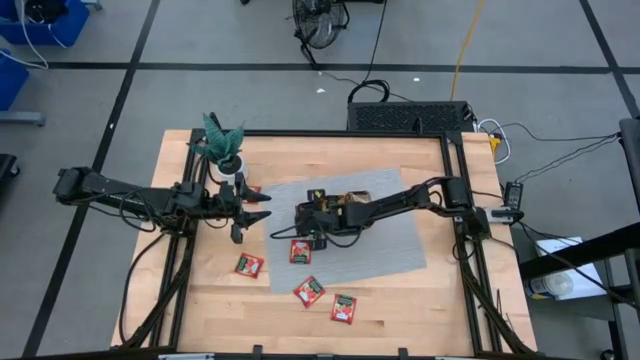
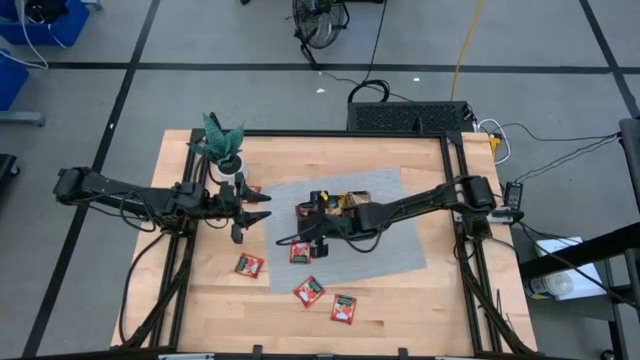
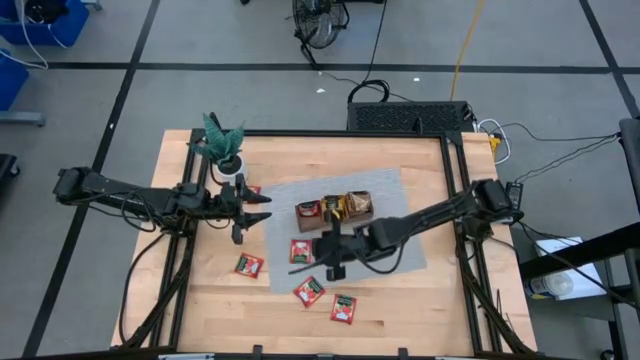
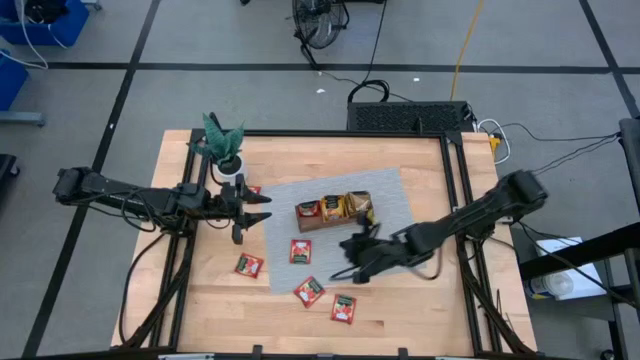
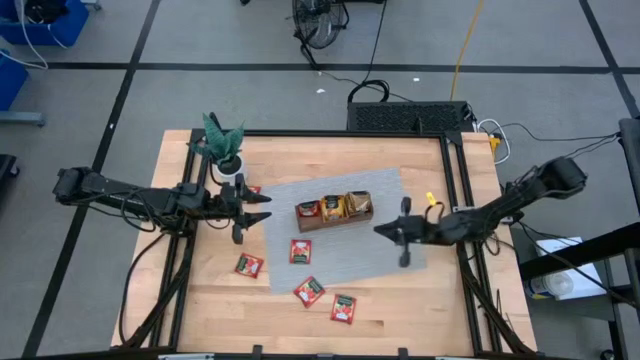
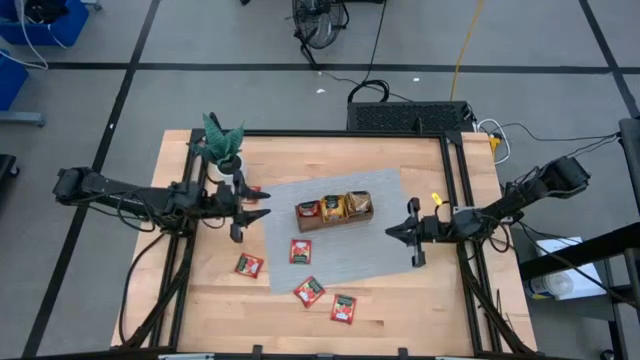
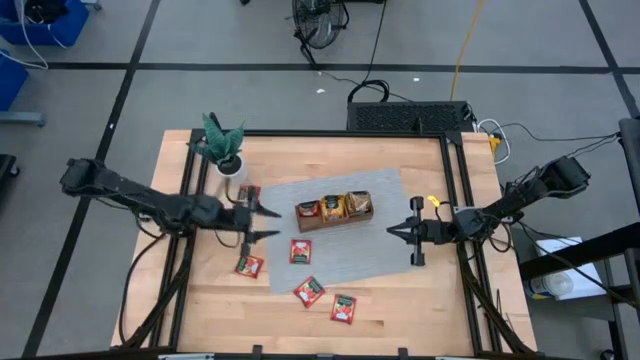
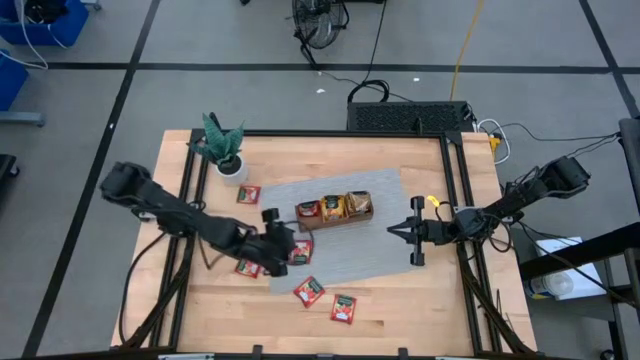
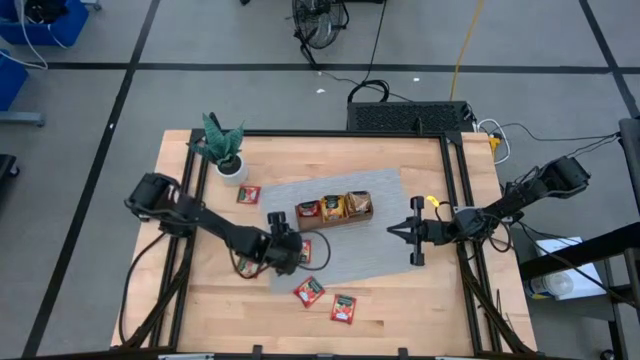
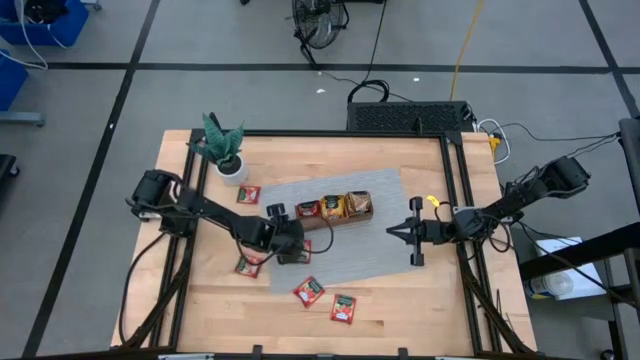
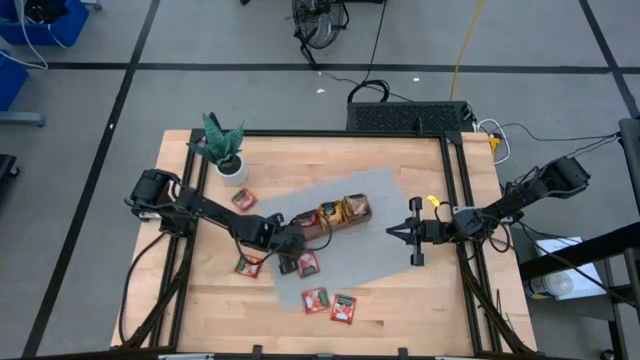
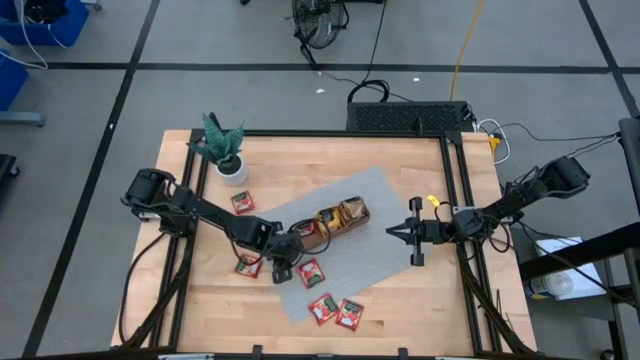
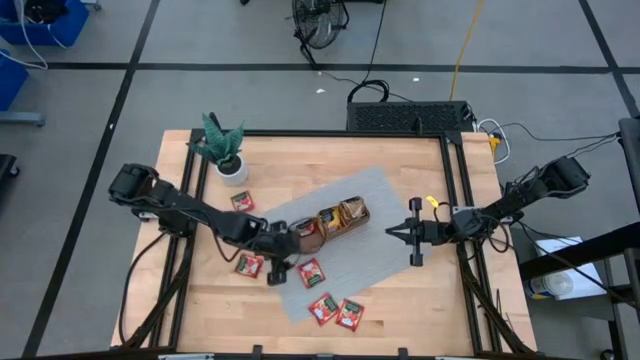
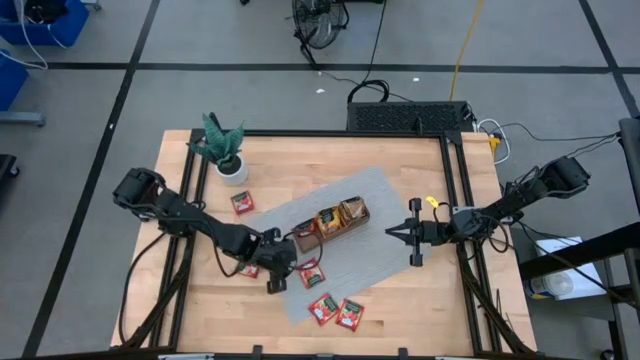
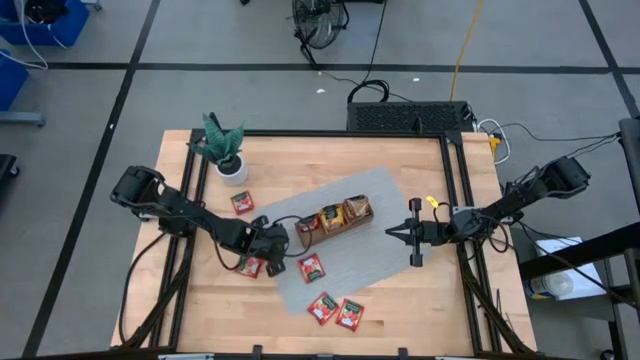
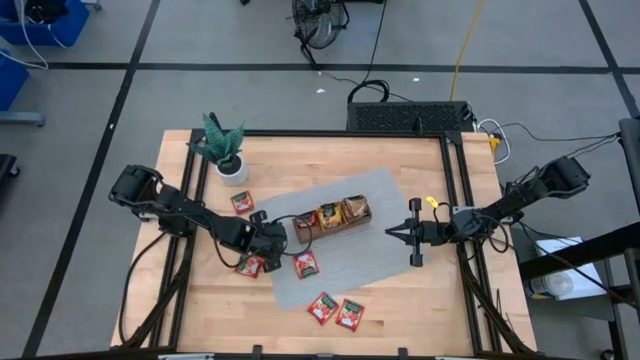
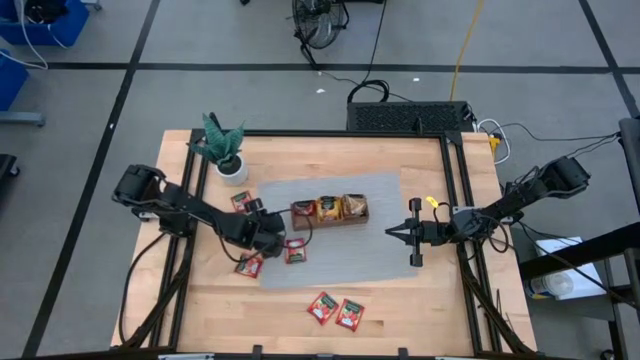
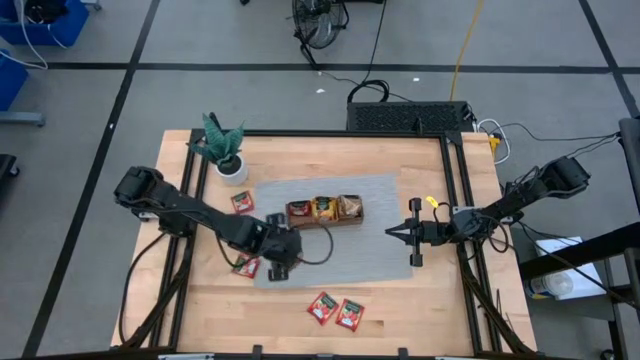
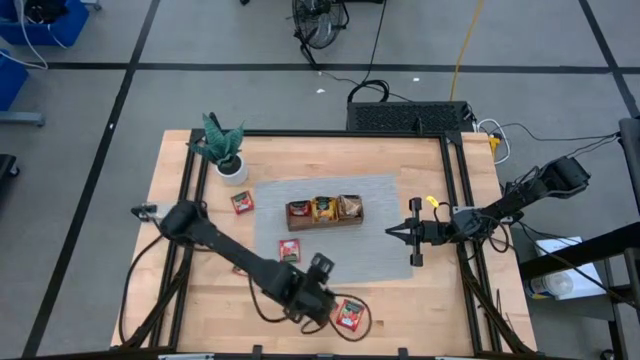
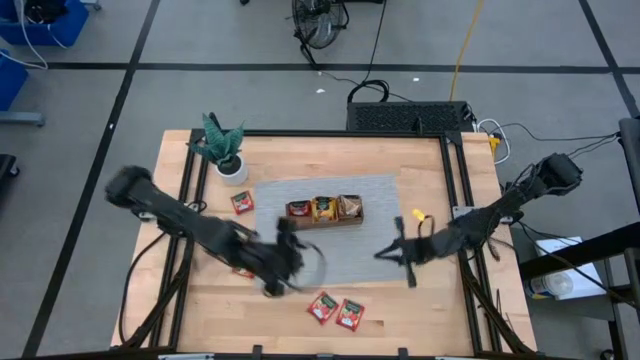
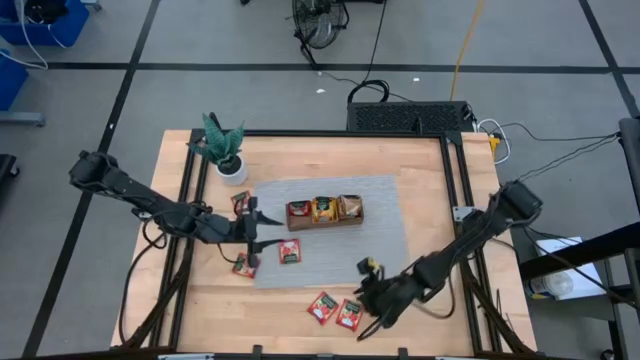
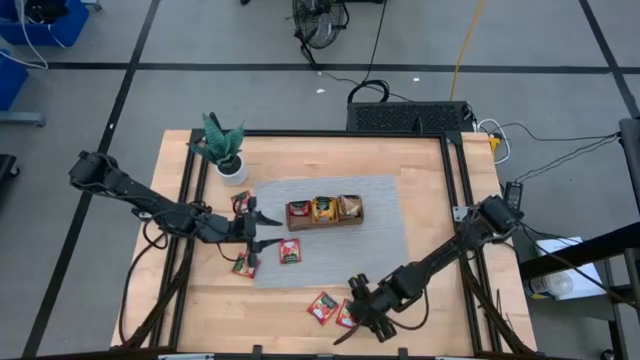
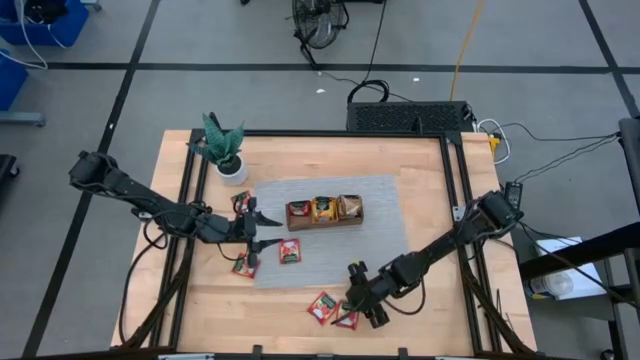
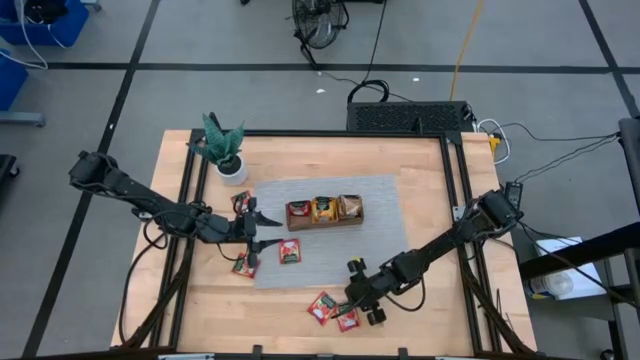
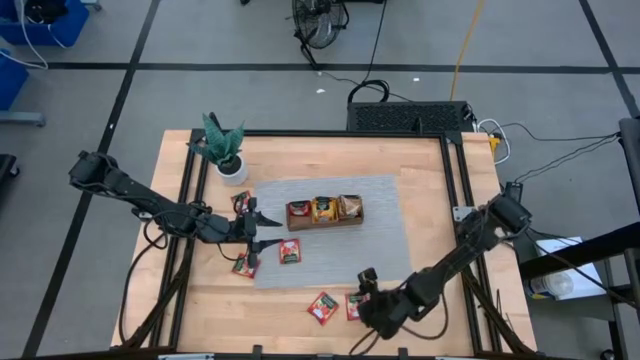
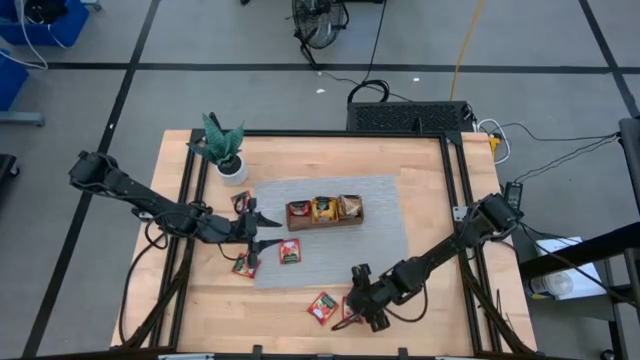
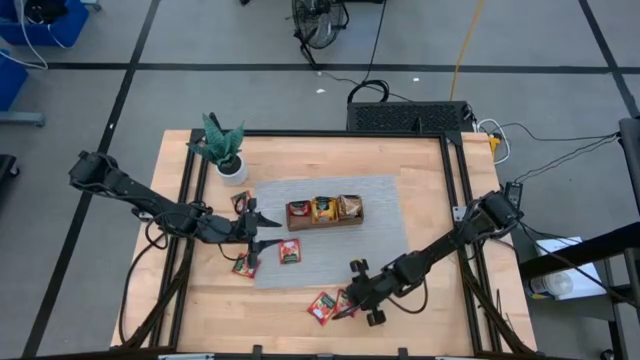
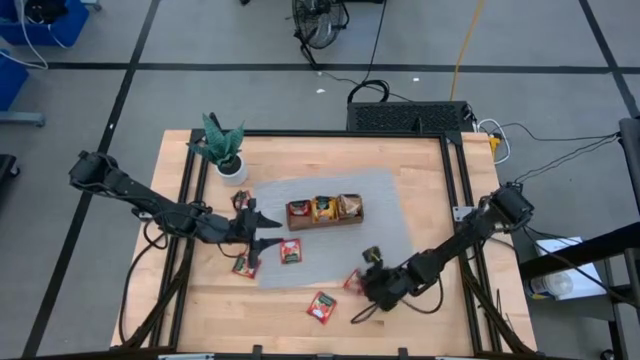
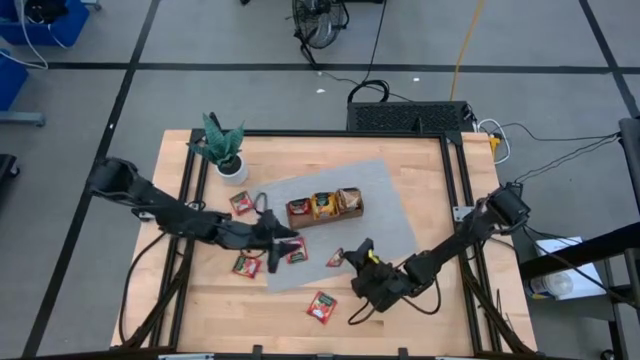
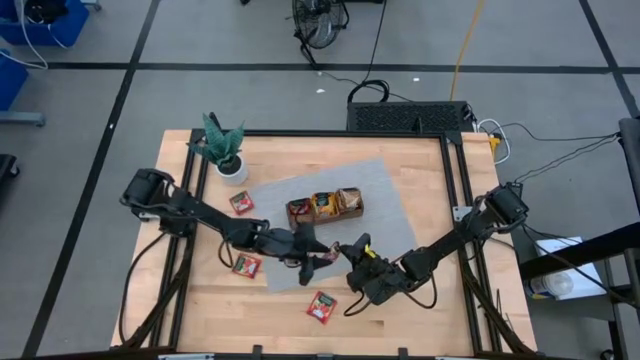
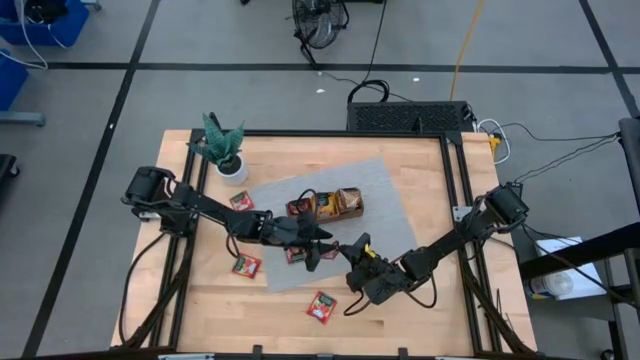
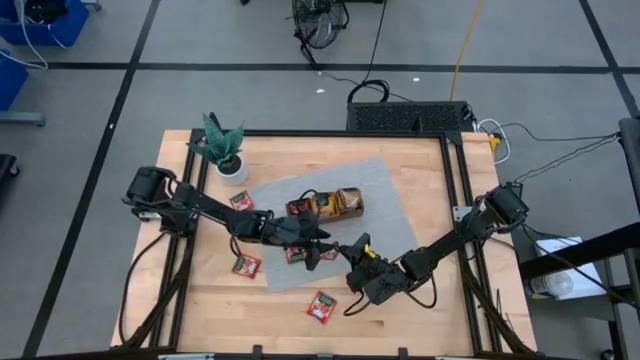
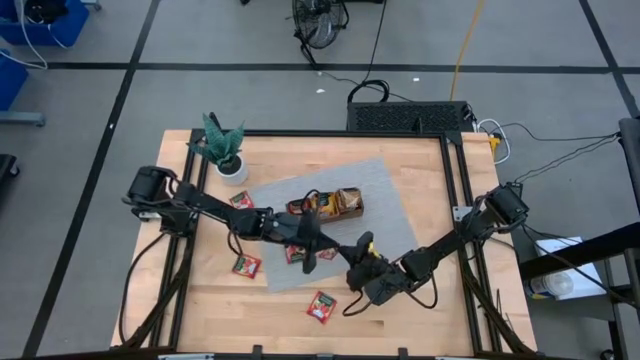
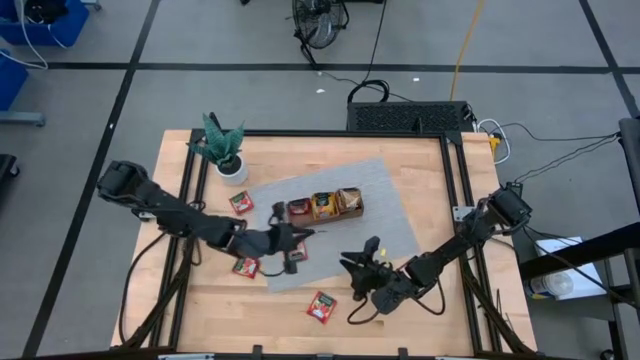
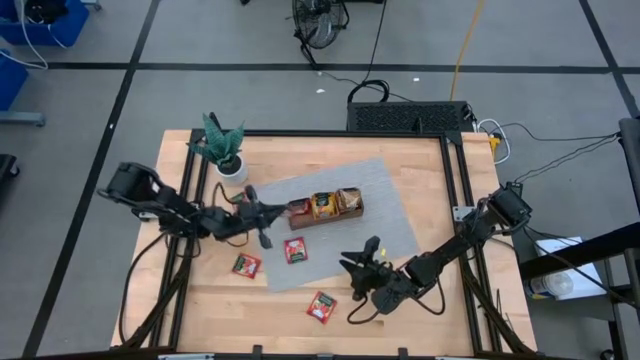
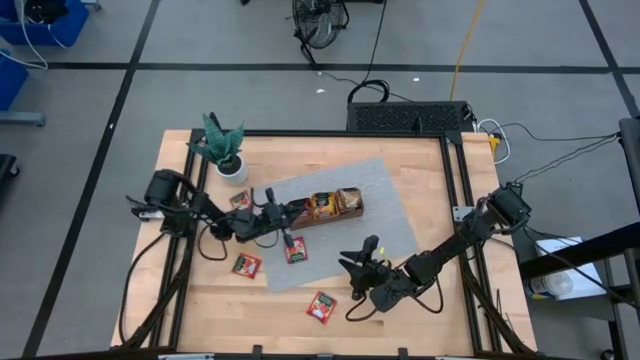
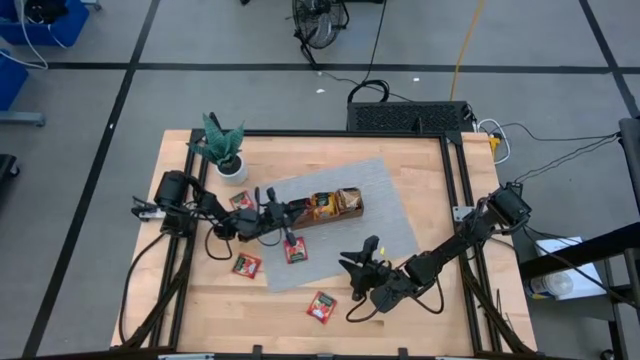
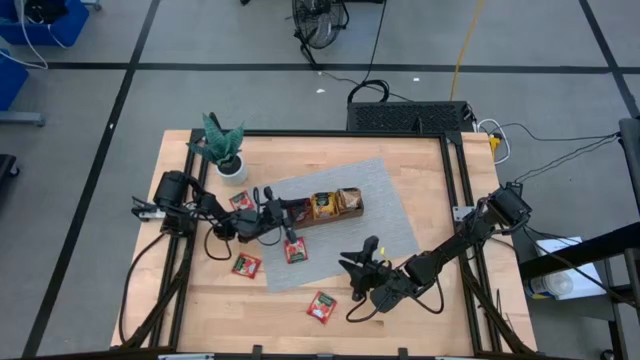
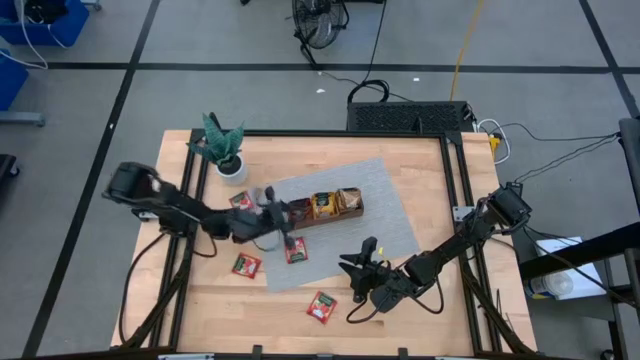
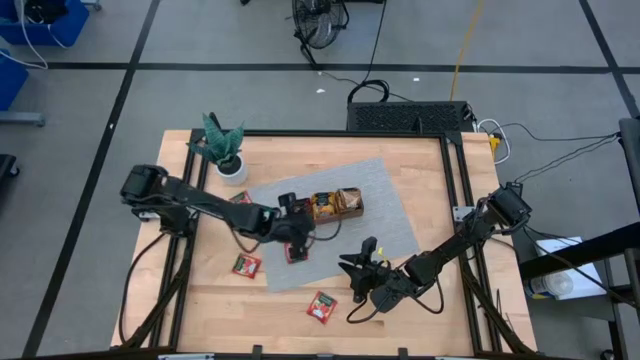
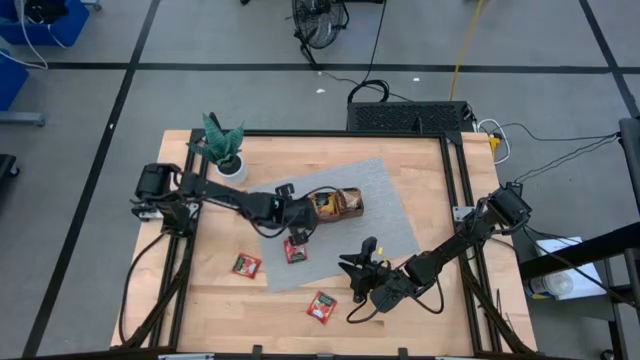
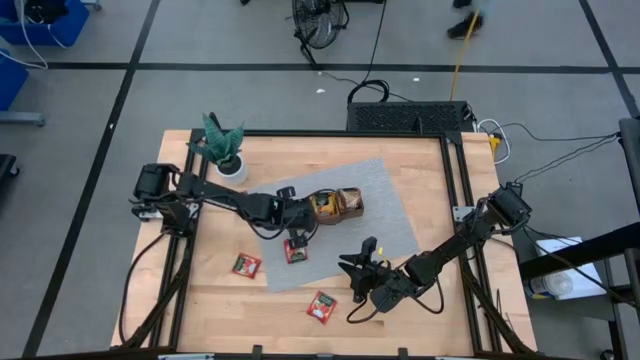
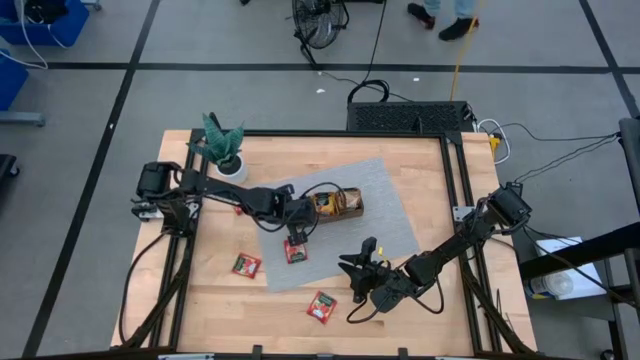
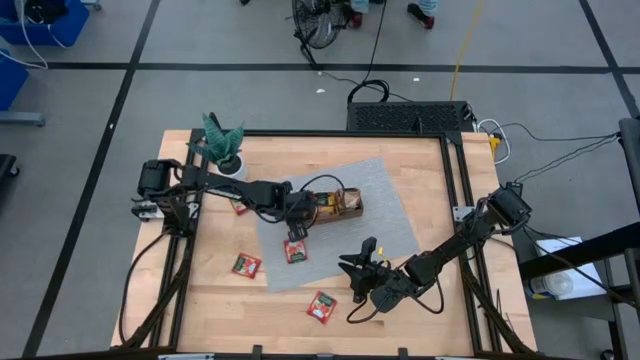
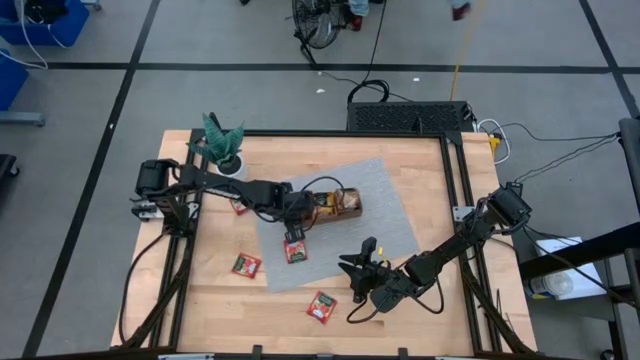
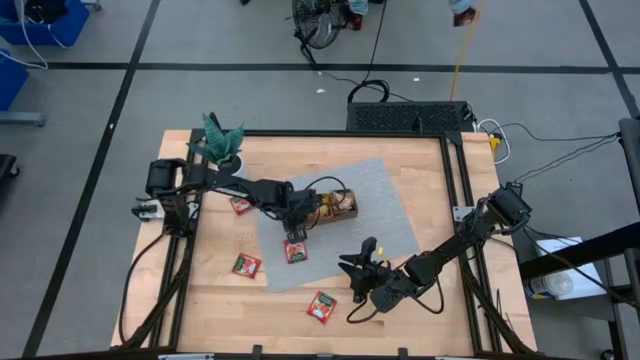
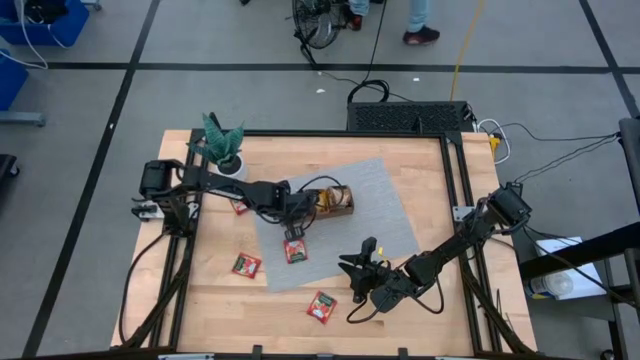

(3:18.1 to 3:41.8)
Task: Pick & Place Tea
Put the red tea into the left part of the wooden organizer
